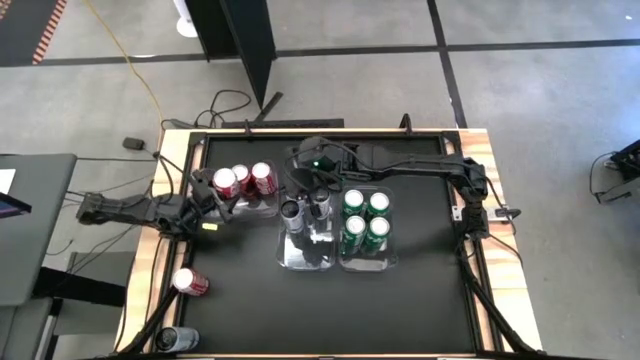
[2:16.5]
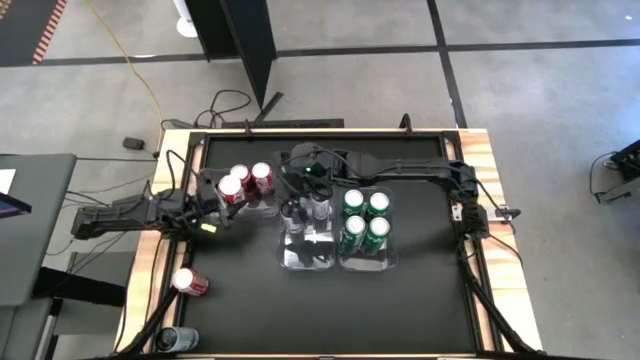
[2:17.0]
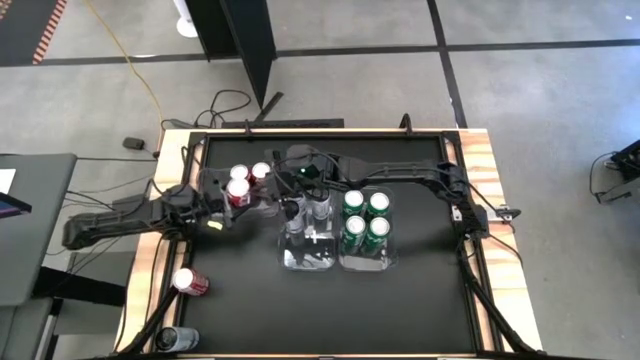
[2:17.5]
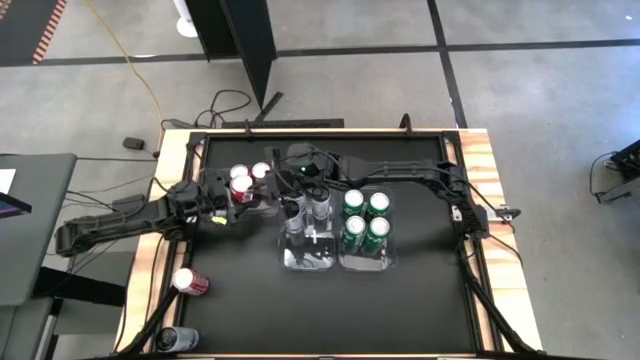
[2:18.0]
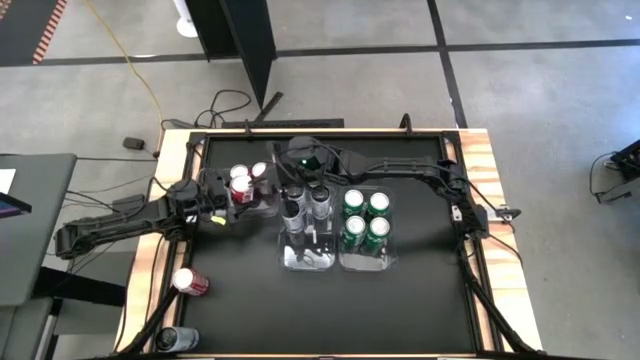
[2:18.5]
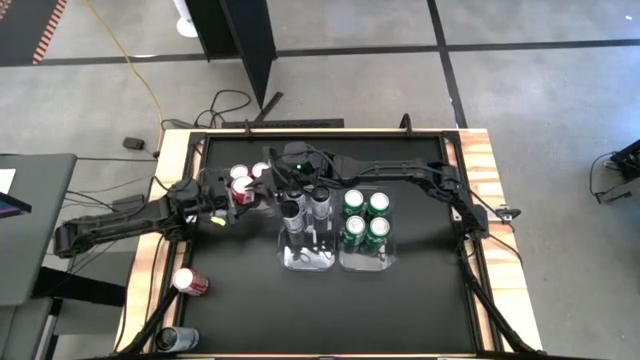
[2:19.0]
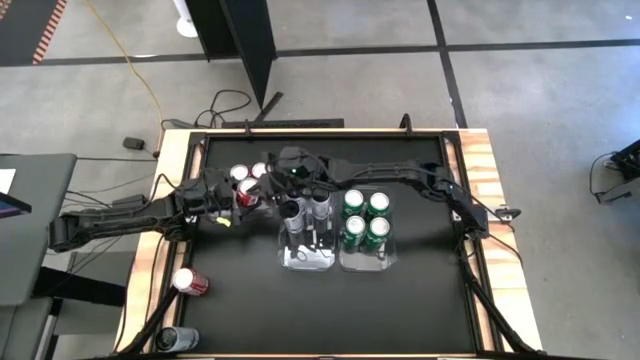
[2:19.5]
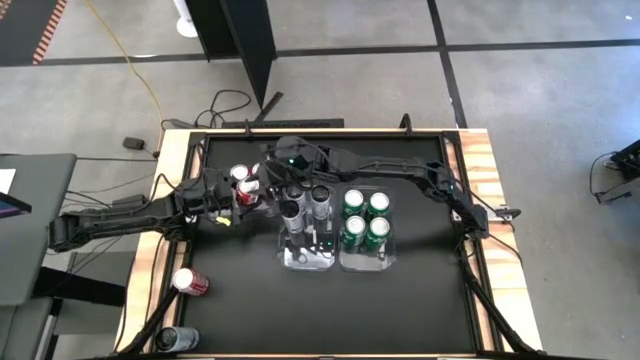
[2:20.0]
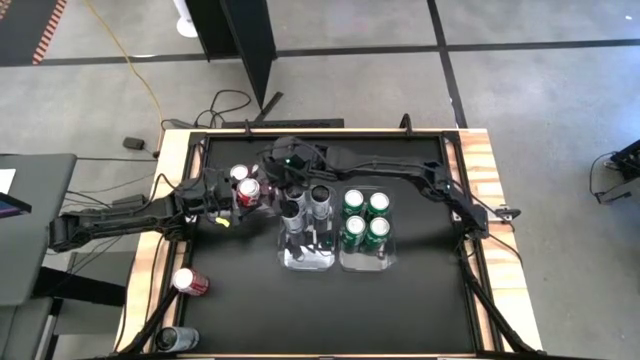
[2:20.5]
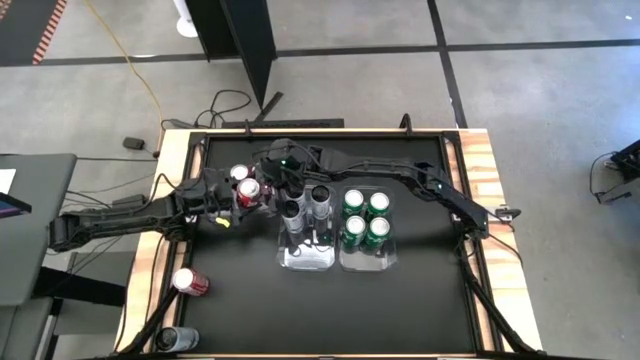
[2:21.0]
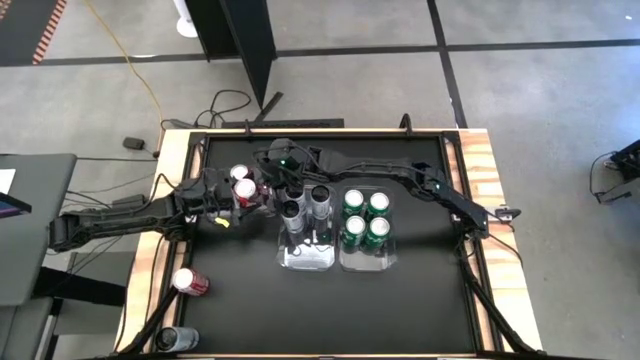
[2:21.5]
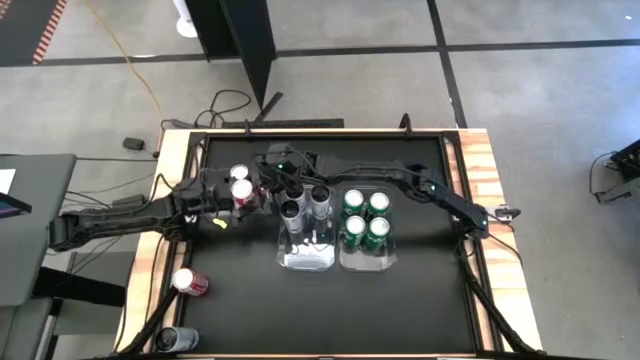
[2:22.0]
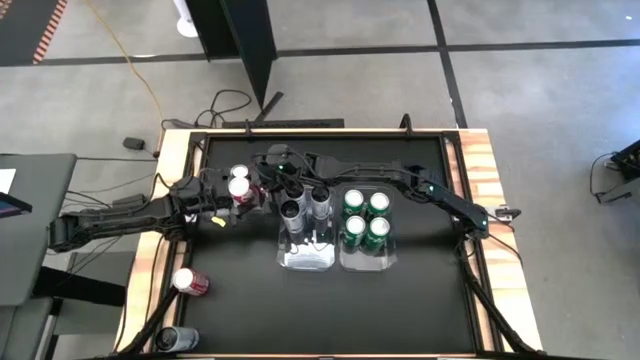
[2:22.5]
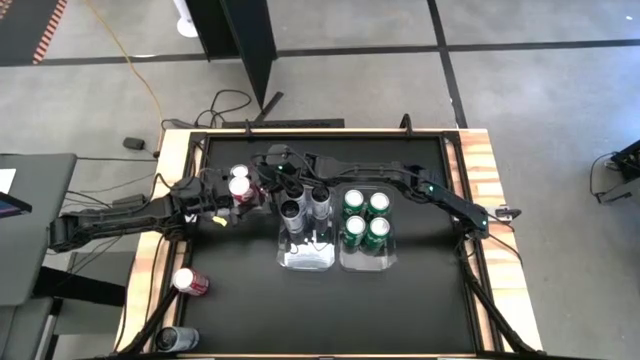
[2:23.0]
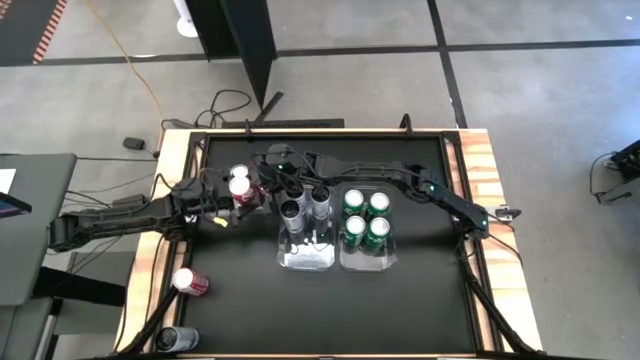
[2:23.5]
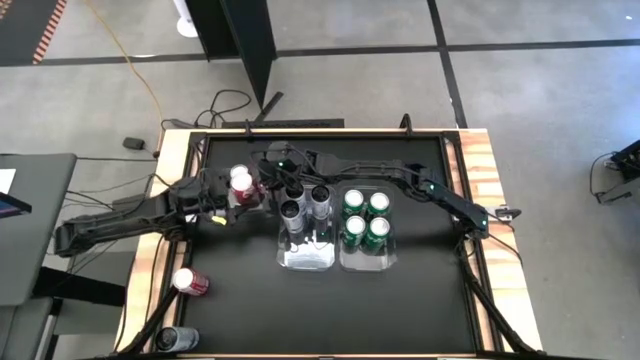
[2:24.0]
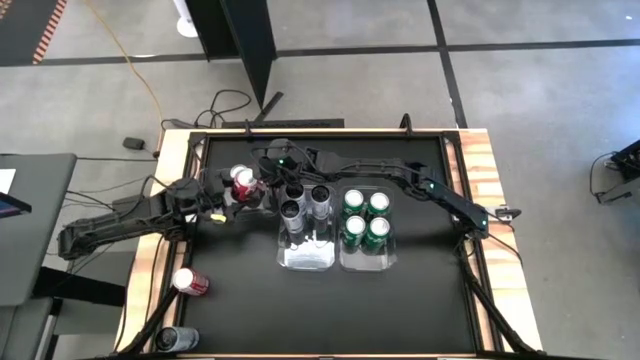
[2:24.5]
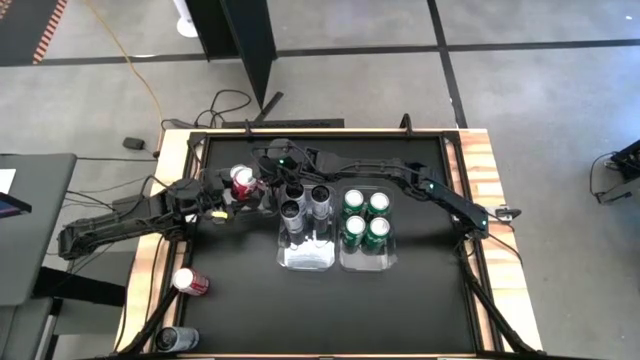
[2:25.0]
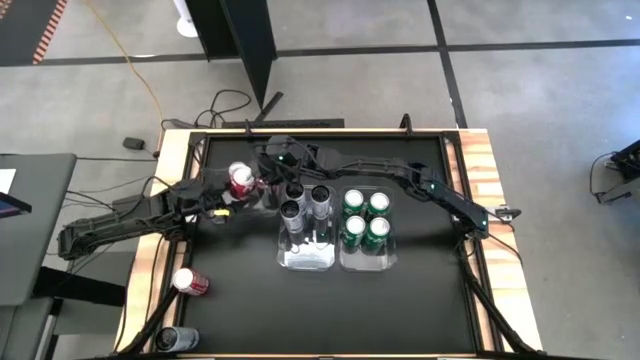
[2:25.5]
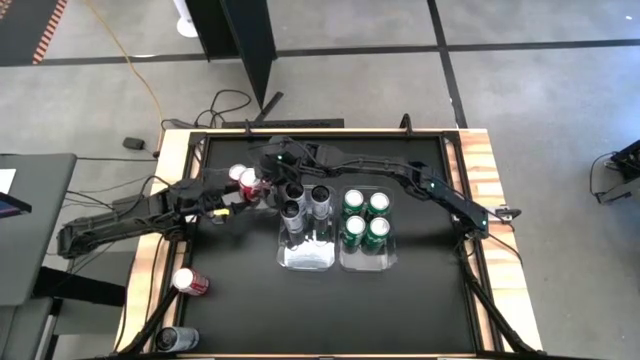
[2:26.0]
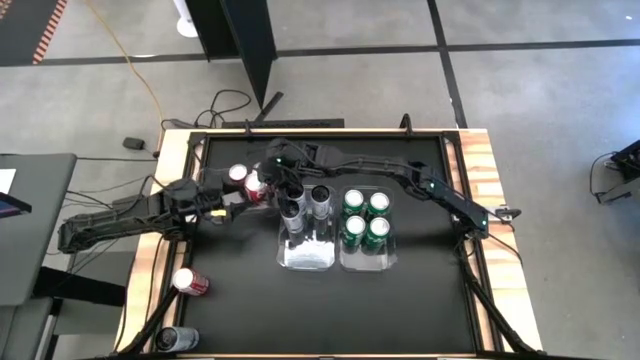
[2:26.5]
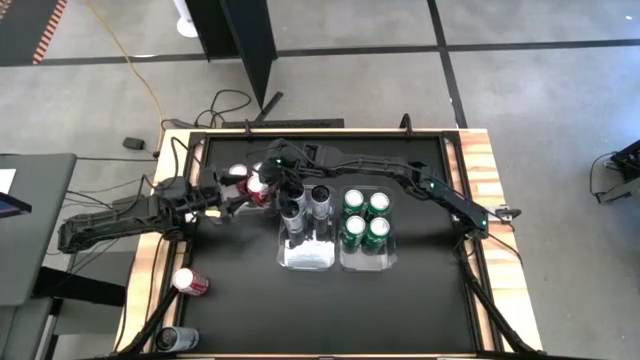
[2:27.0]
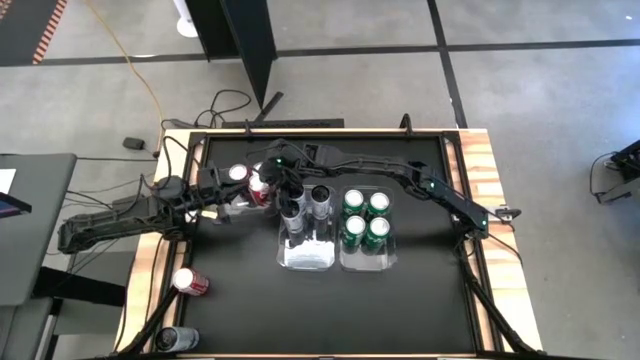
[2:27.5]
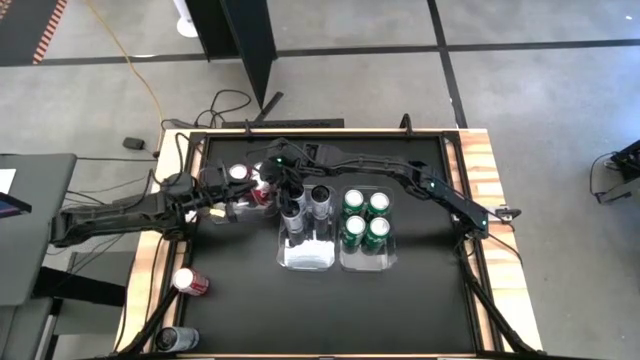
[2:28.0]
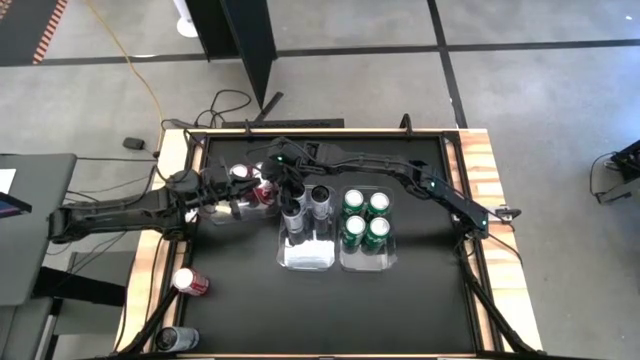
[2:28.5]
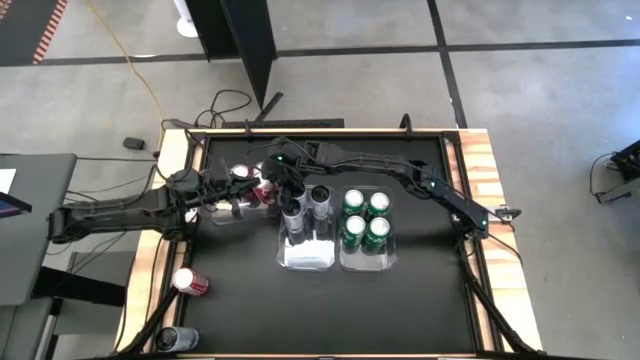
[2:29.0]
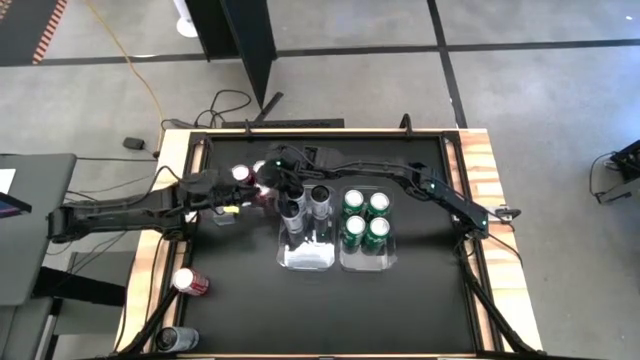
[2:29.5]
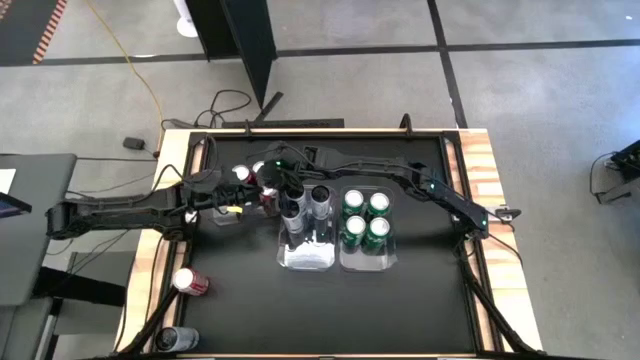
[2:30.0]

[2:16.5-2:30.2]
Task: Sort soda cans
Put the top red soda can into the left transparent bin

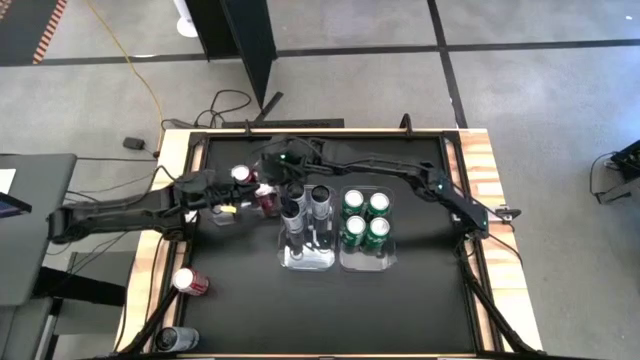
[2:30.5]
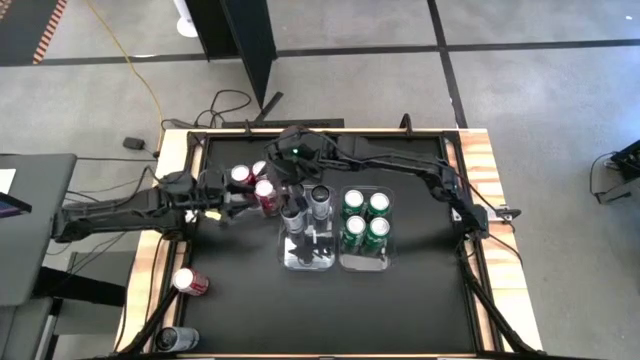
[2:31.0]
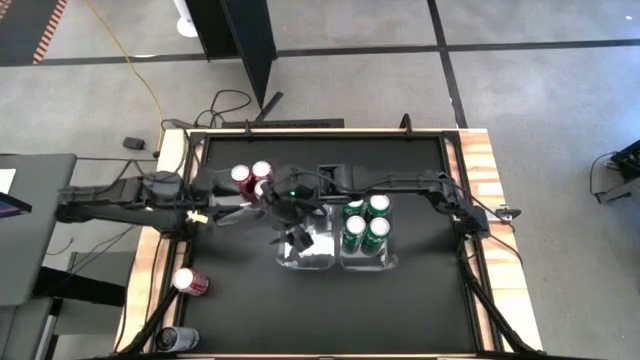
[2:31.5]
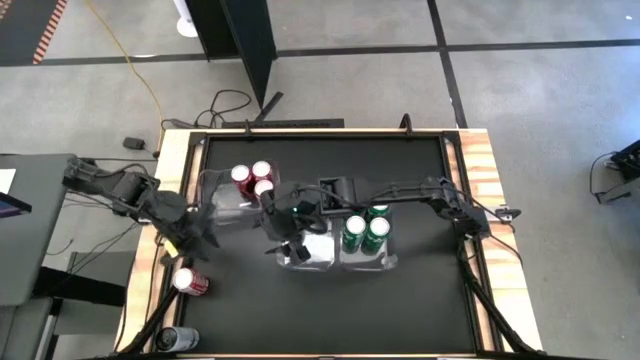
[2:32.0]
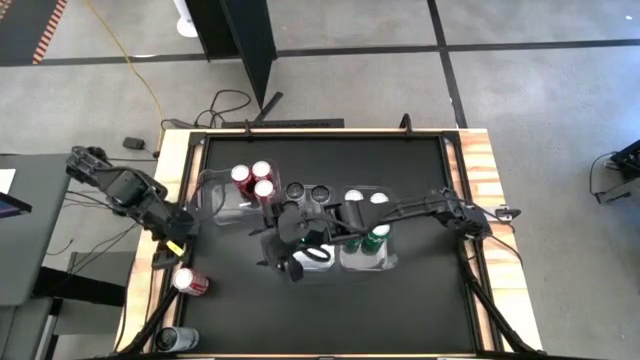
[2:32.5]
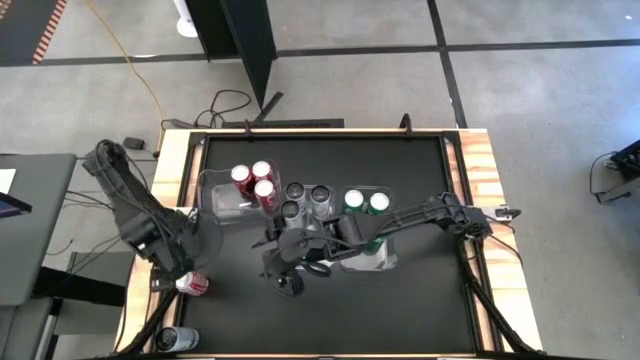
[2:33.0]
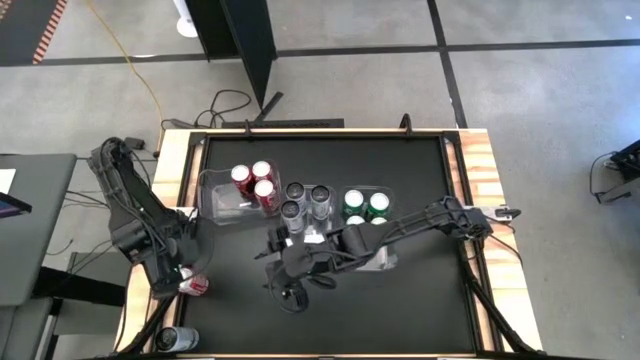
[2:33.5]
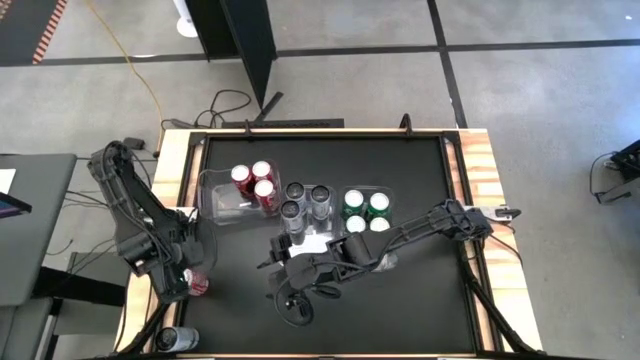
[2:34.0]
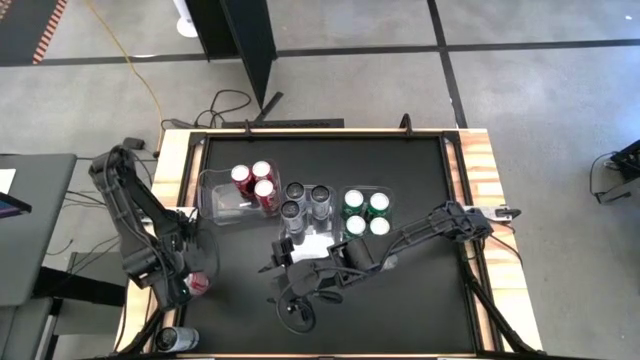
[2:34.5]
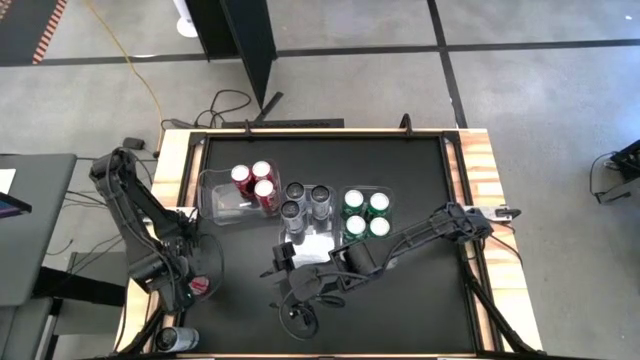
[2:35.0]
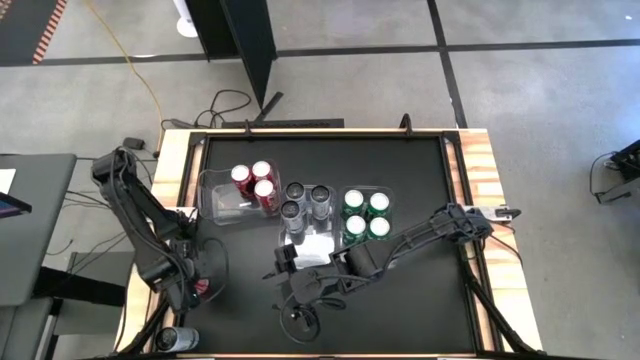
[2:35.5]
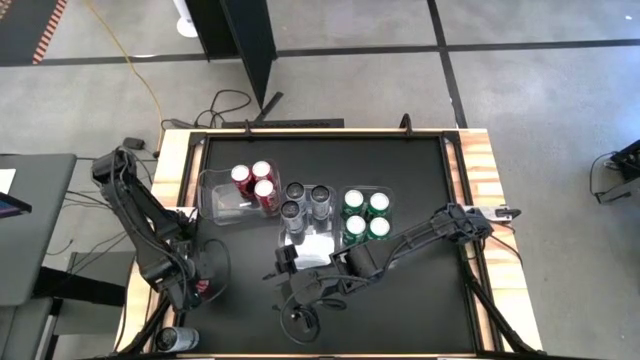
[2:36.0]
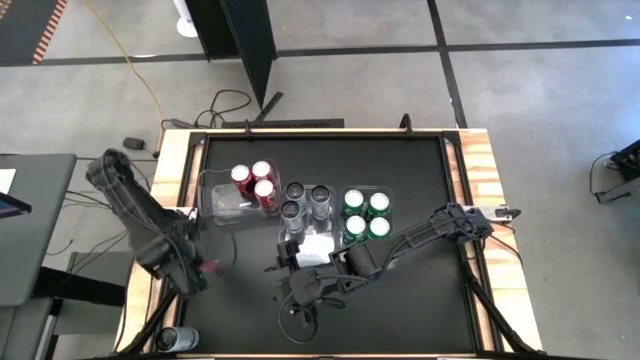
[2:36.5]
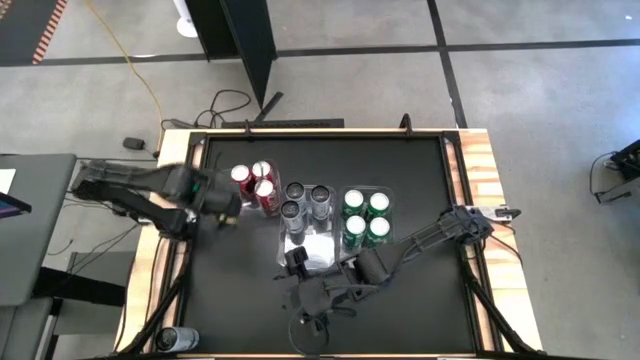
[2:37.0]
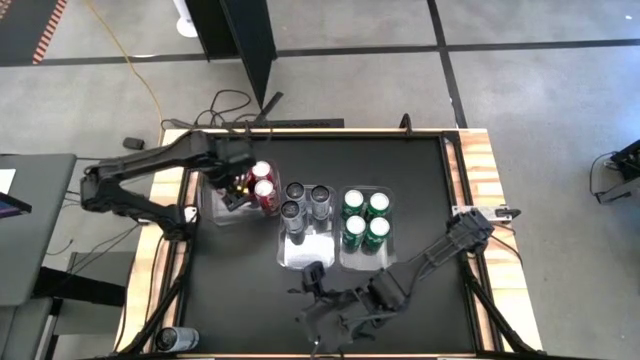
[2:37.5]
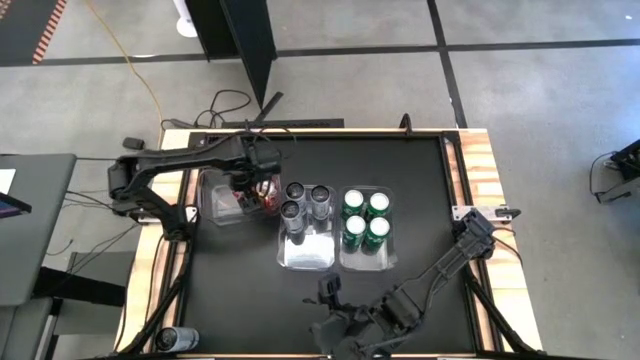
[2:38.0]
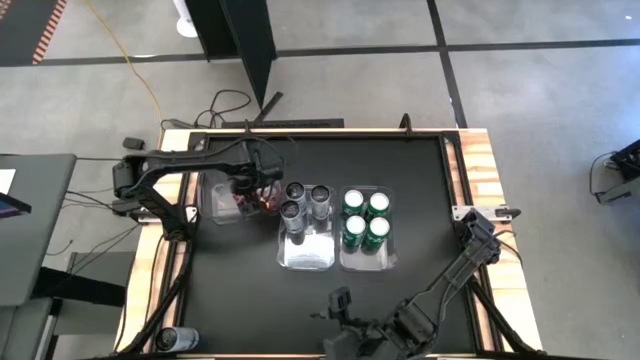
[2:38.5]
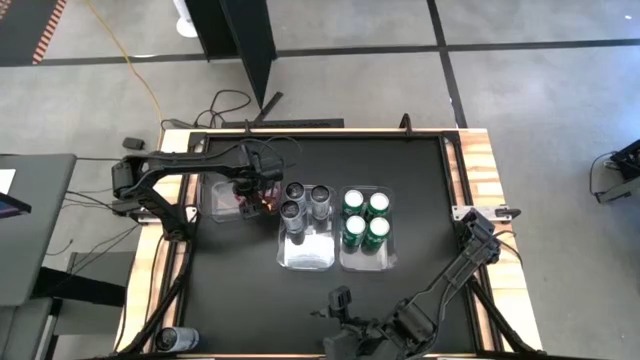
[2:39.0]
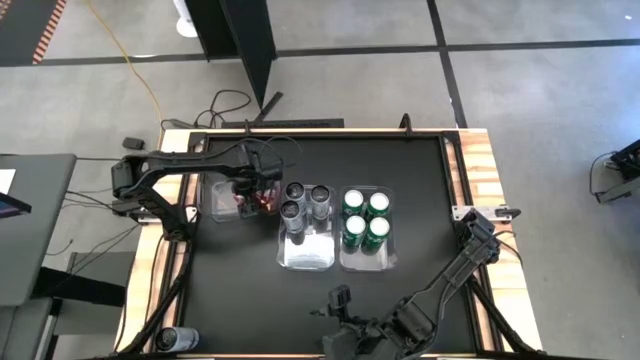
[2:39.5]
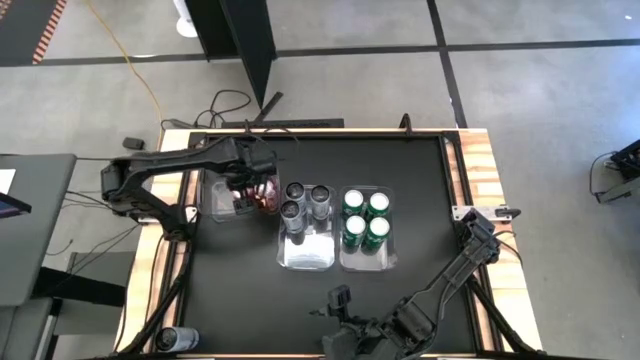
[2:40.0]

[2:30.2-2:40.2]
Put the red soda can into the left transparent bin
